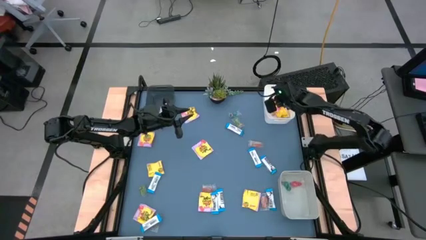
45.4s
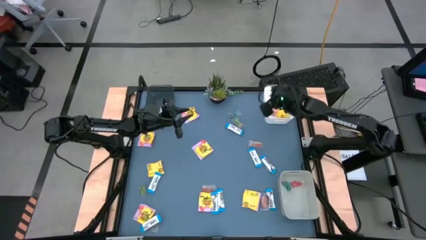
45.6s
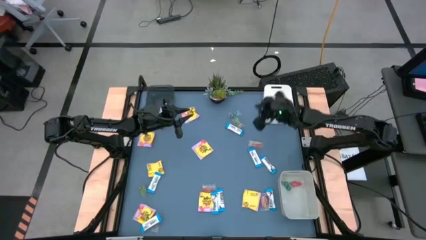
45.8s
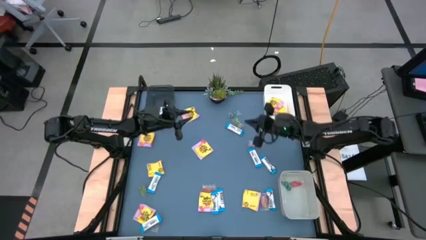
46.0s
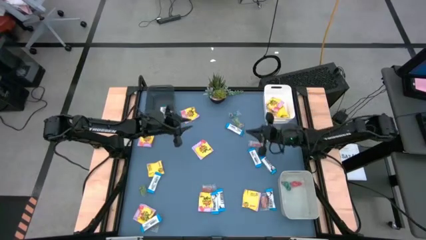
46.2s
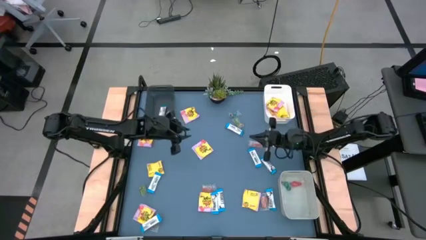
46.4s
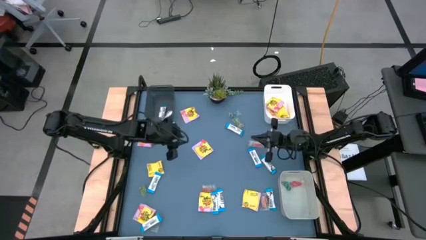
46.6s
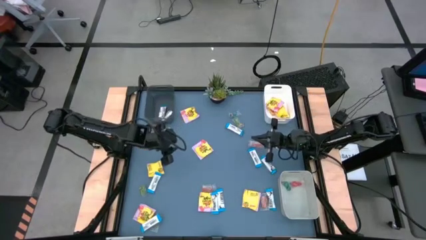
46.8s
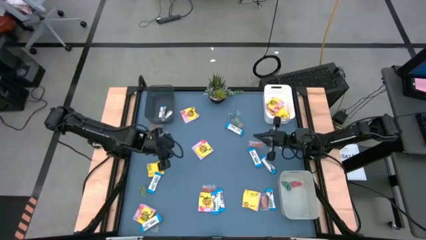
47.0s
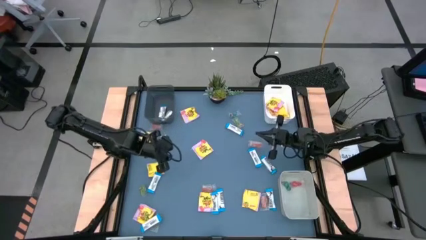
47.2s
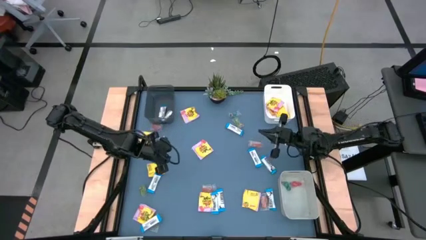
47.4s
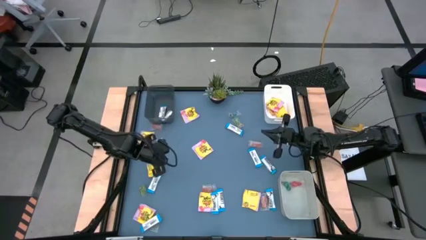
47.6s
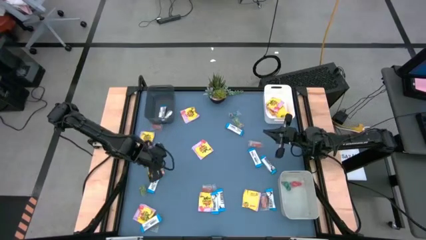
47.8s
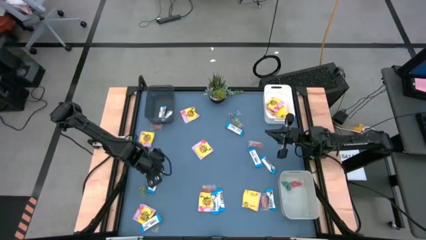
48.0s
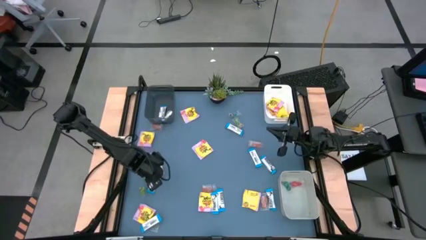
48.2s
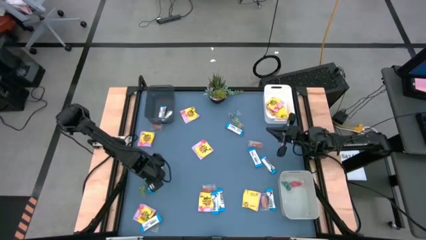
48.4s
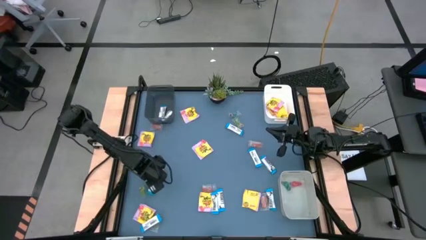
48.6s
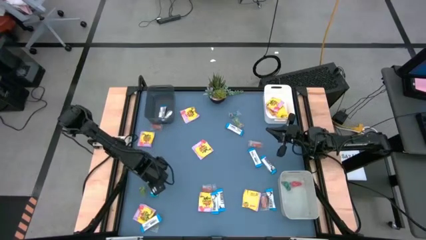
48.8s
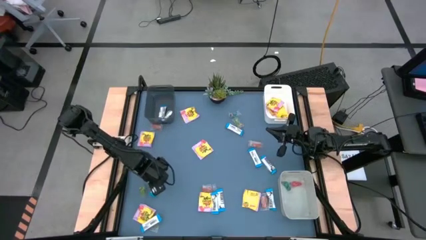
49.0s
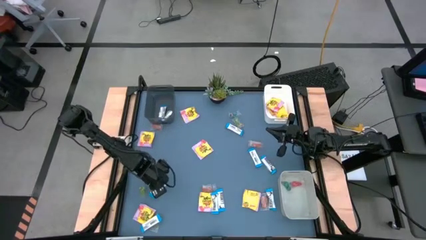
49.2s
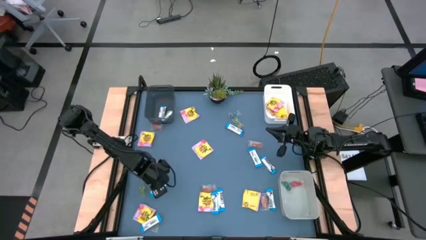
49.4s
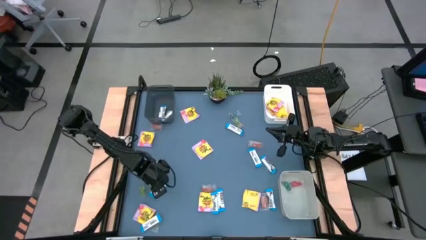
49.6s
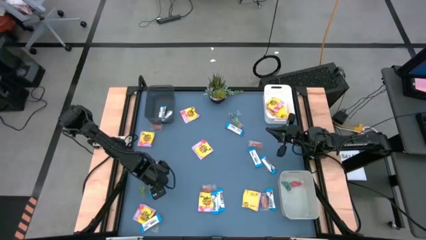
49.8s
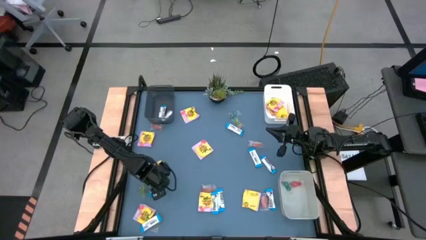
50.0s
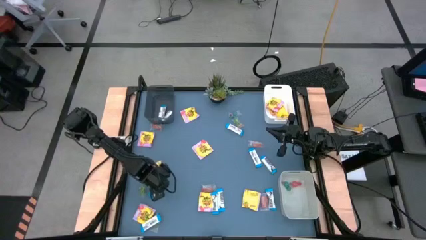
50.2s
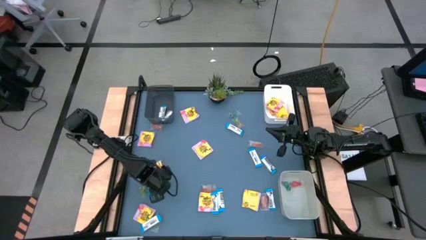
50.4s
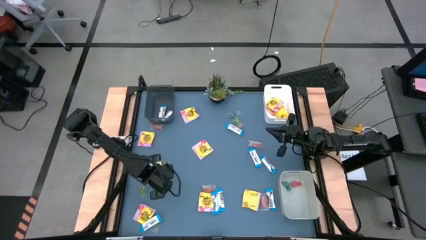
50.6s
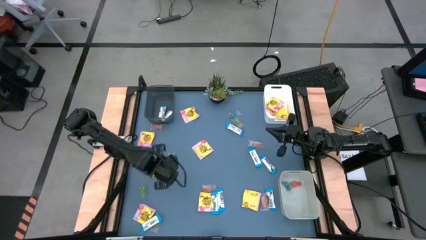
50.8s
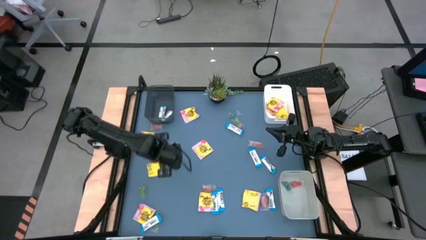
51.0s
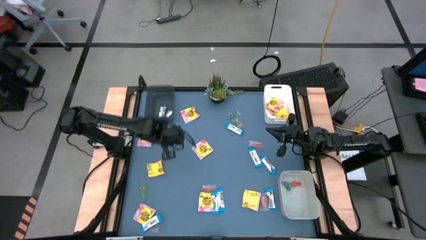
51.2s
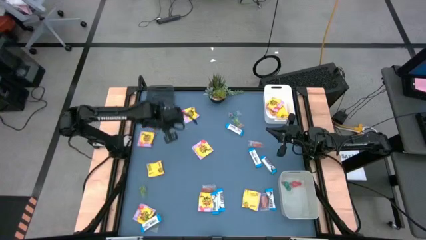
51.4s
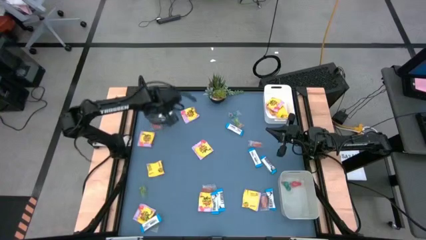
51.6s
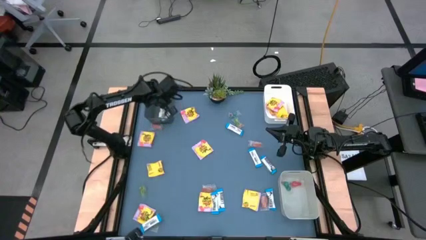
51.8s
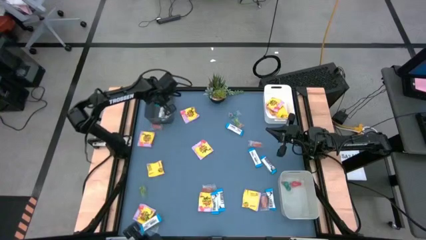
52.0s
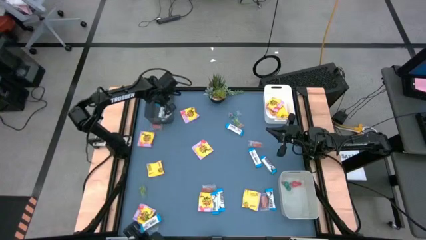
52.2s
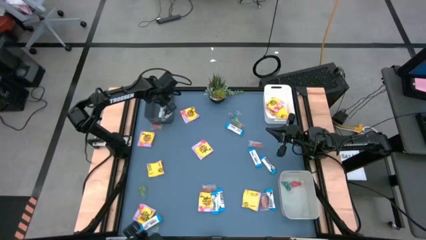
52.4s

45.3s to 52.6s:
Task: Sort candy
Put the middle left white chocolate bar into the transparent black bin

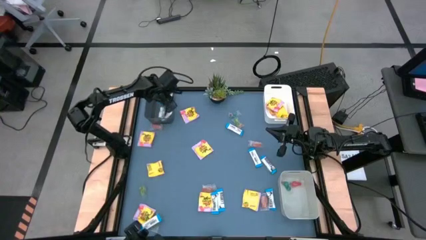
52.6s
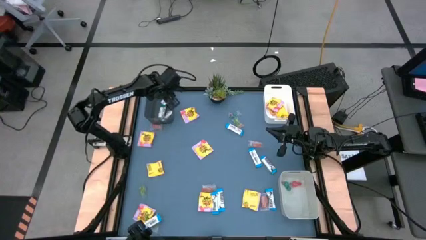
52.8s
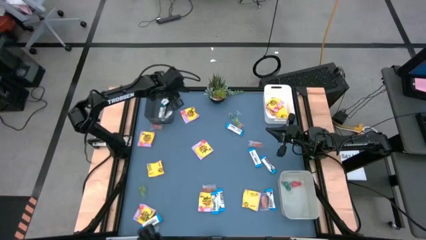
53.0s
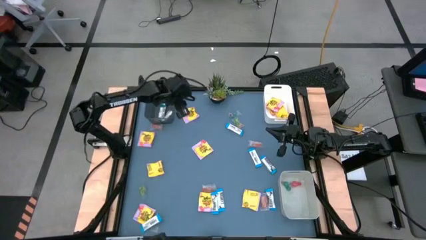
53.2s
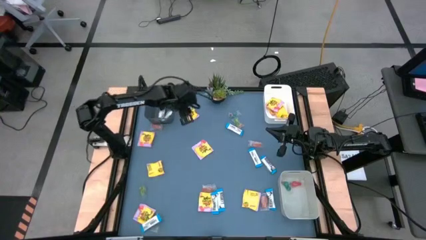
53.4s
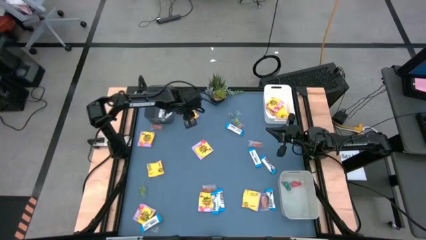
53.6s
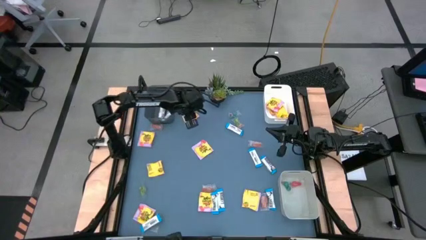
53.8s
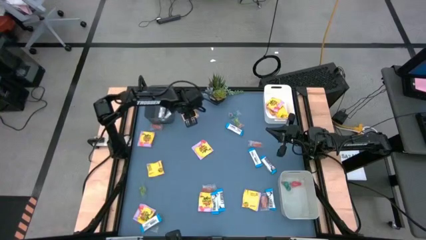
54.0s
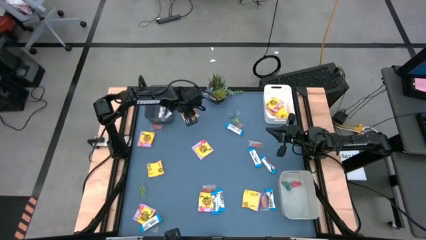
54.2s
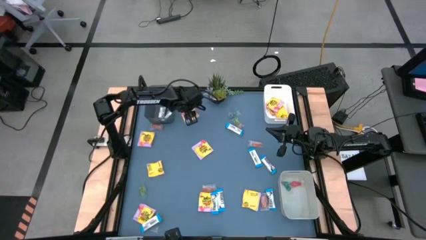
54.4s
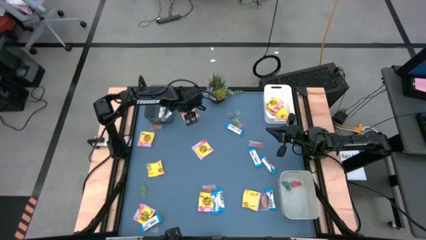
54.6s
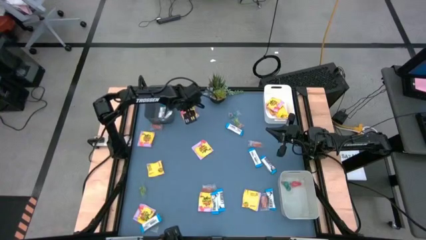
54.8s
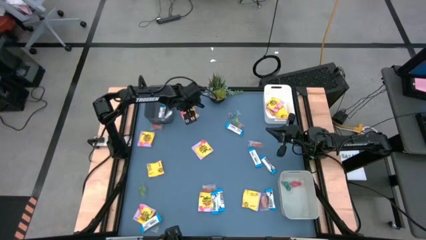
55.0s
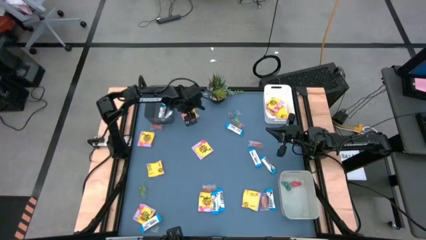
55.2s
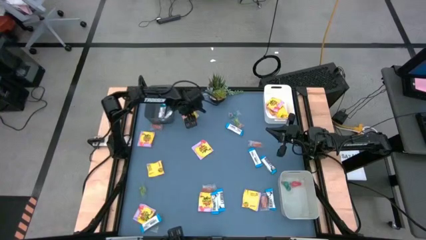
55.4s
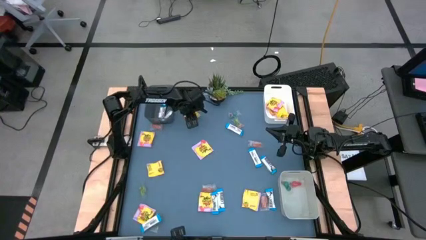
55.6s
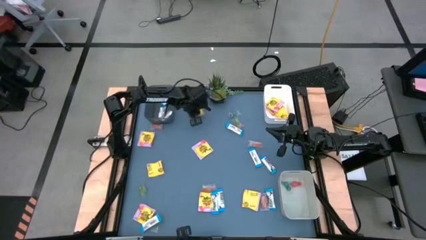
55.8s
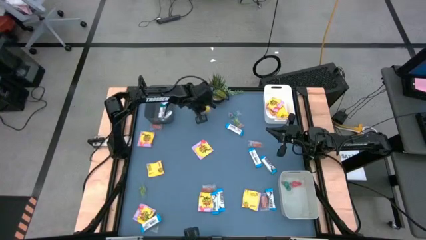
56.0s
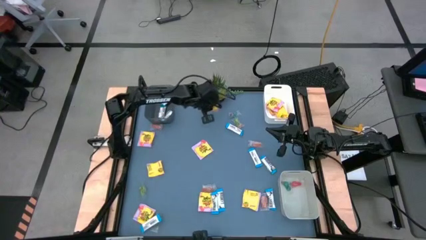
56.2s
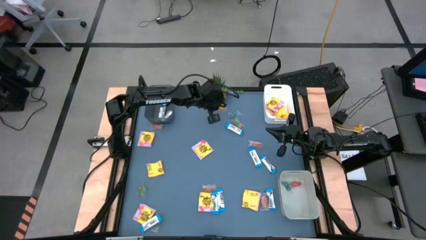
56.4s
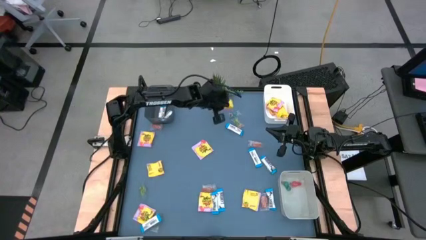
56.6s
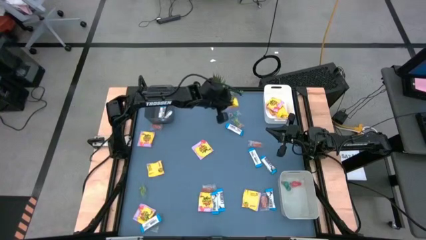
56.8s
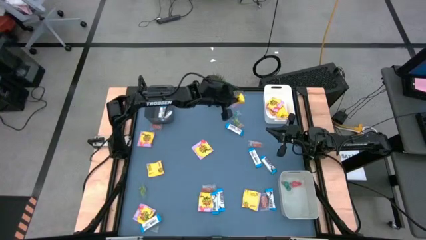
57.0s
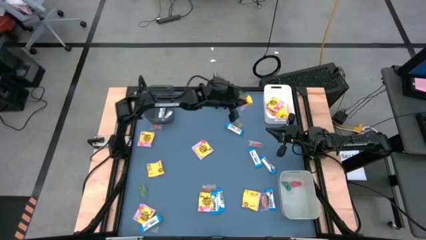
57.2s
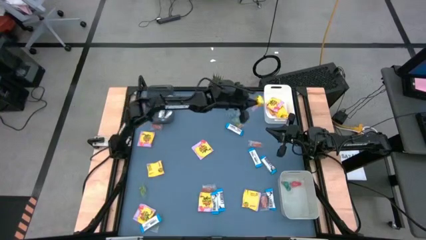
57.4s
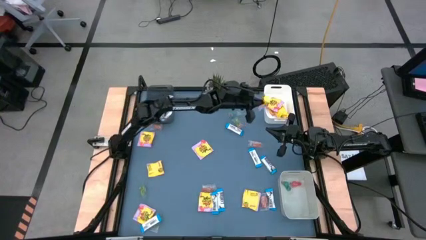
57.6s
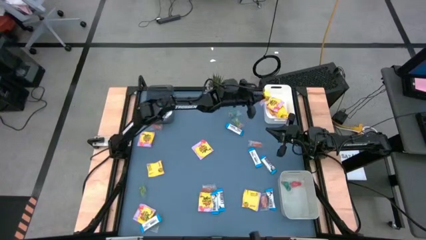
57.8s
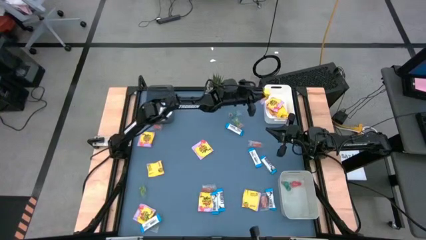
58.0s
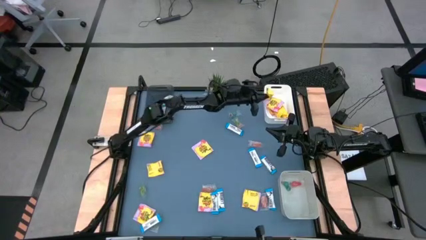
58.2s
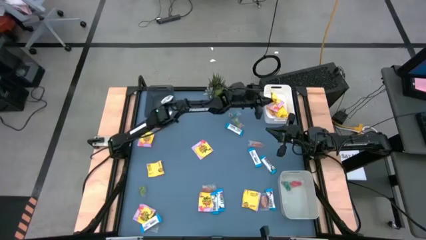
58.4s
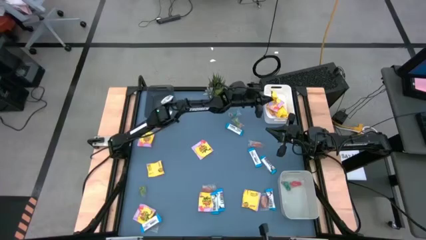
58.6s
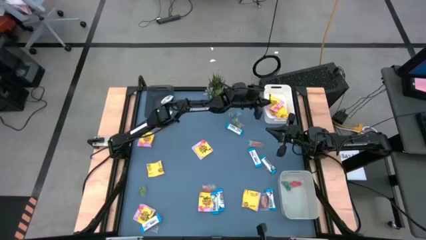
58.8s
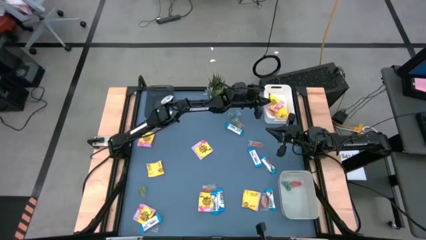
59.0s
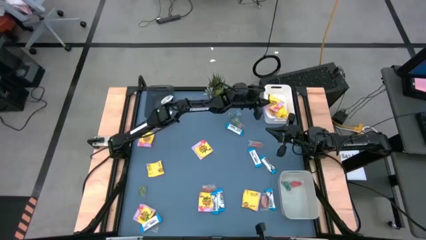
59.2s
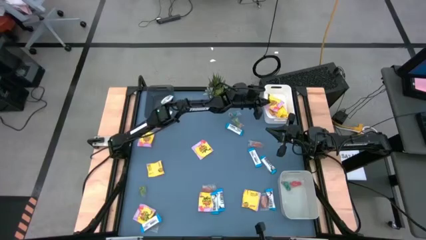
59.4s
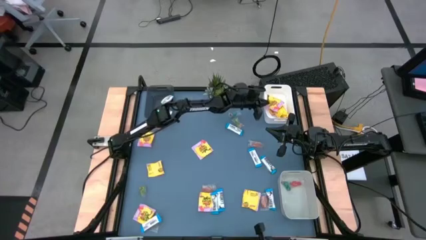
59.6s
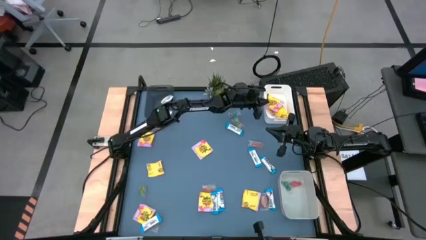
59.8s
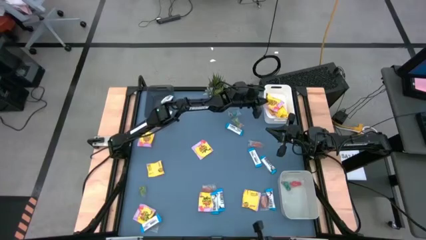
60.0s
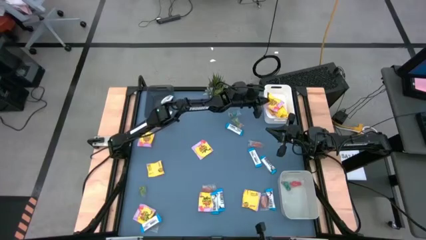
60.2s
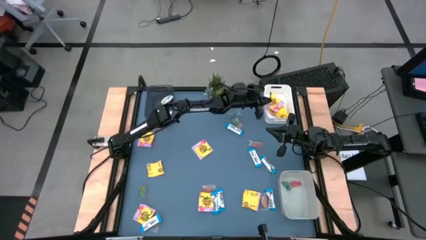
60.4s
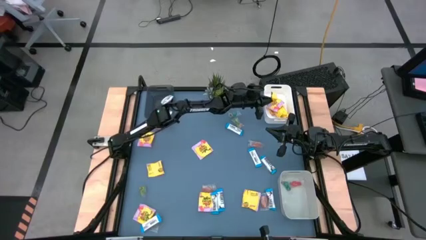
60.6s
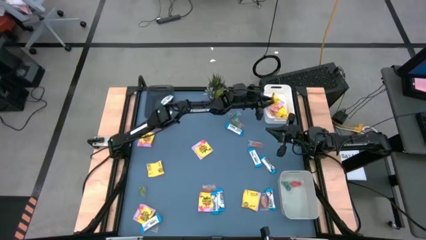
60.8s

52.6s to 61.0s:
Put the top yellow candy pack into the white bin

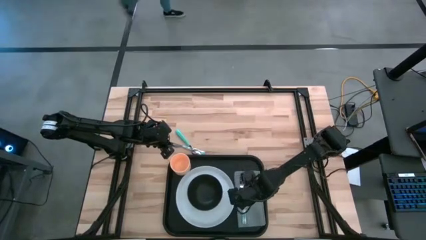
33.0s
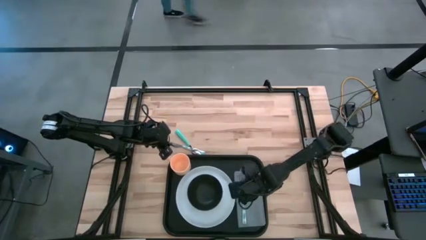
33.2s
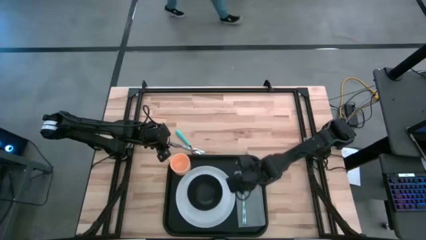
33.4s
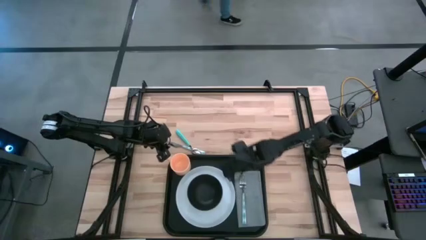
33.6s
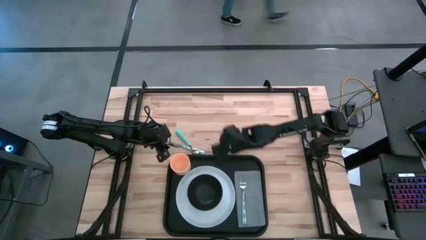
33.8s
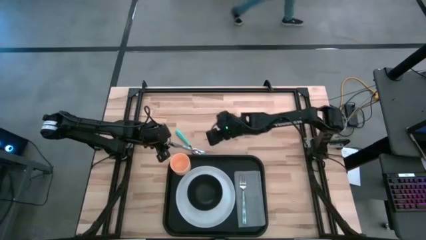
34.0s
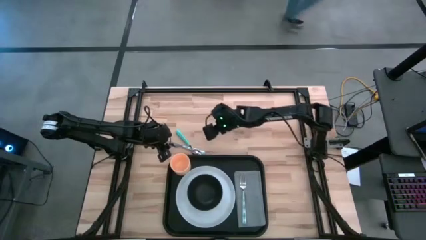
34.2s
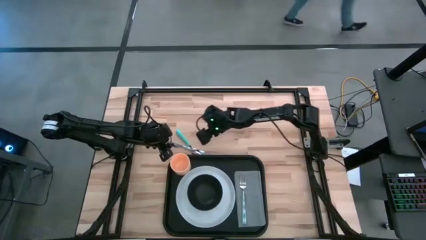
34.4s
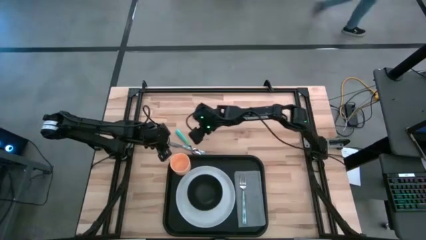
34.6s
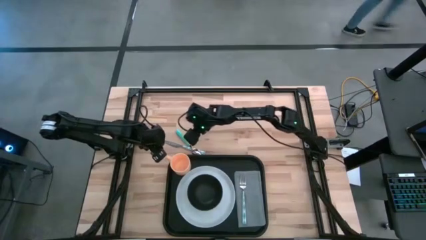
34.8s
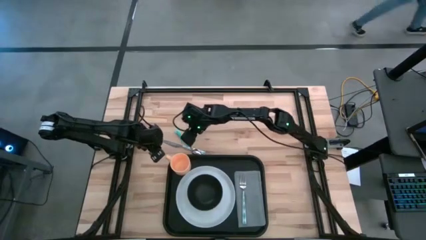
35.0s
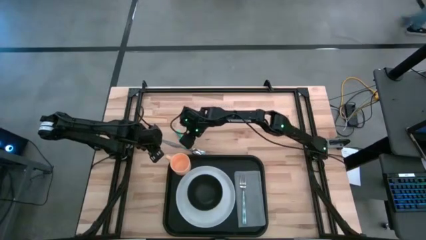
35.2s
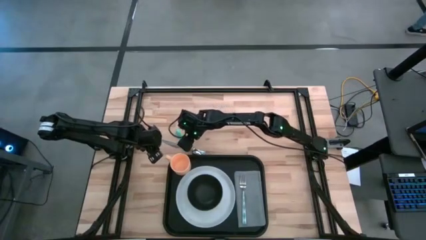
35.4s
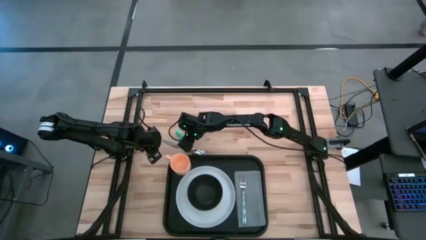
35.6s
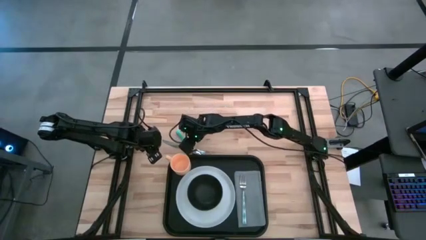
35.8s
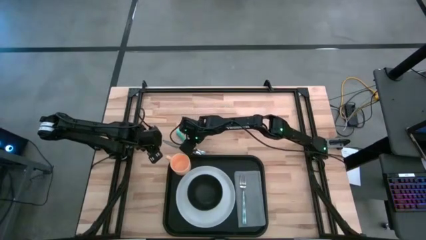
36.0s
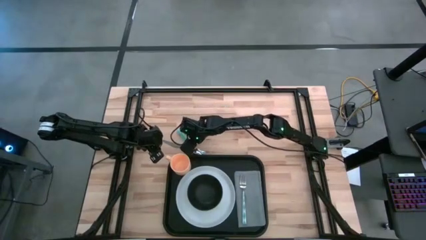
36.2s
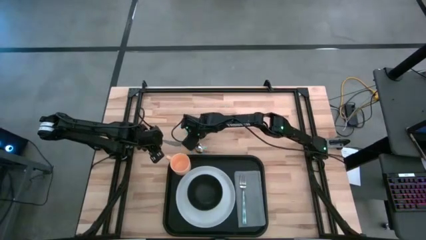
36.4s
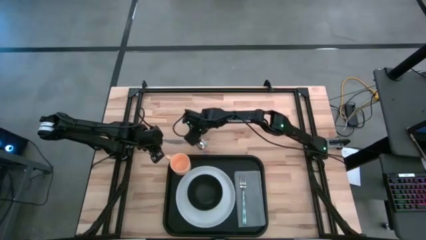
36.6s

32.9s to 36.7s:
Task: Set up tray
Adjust the green spoon
